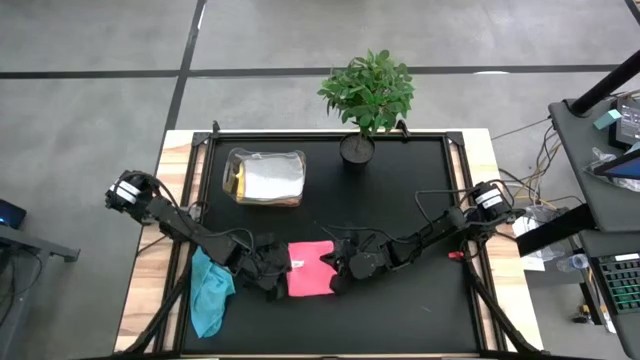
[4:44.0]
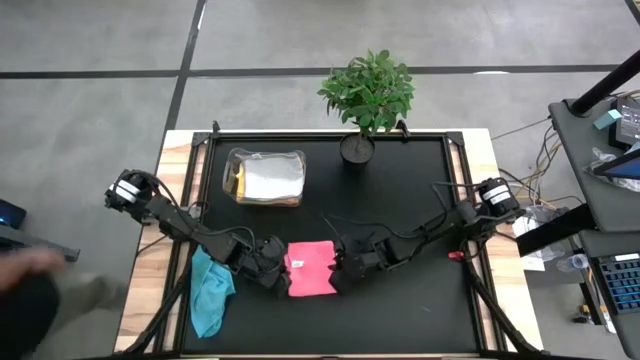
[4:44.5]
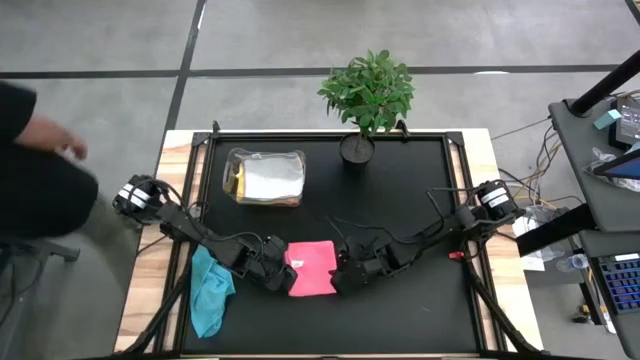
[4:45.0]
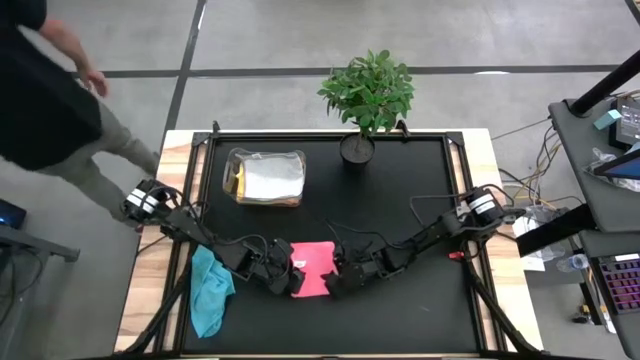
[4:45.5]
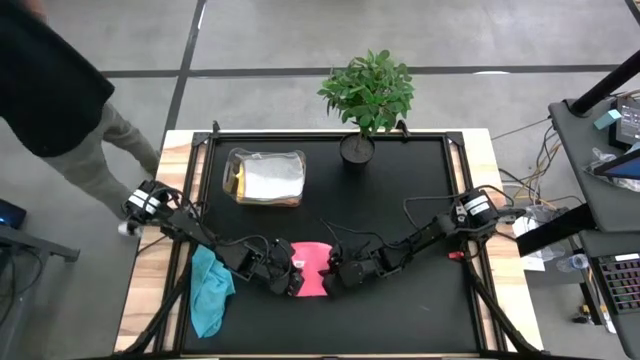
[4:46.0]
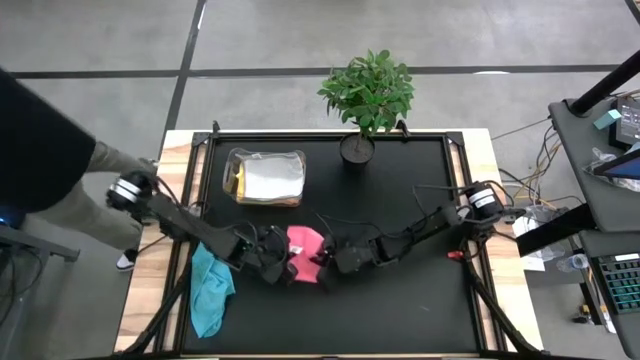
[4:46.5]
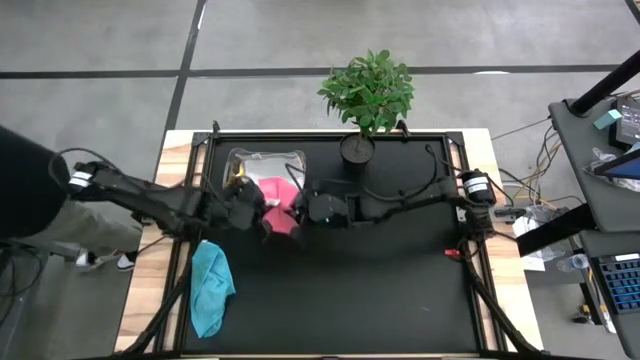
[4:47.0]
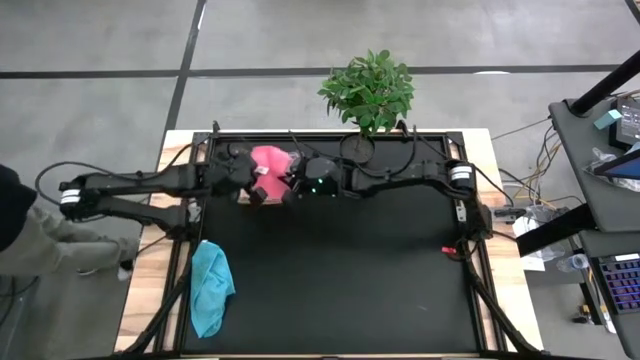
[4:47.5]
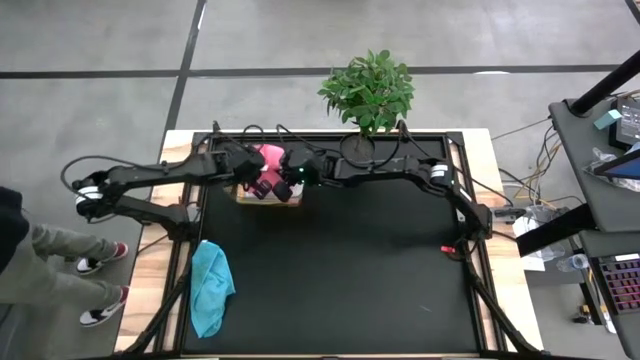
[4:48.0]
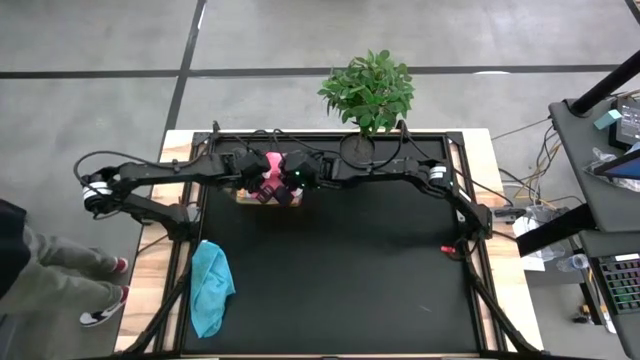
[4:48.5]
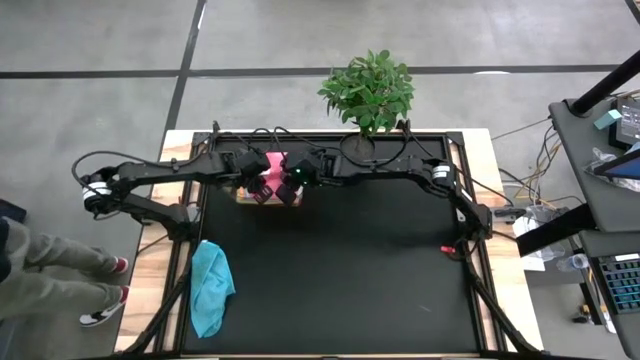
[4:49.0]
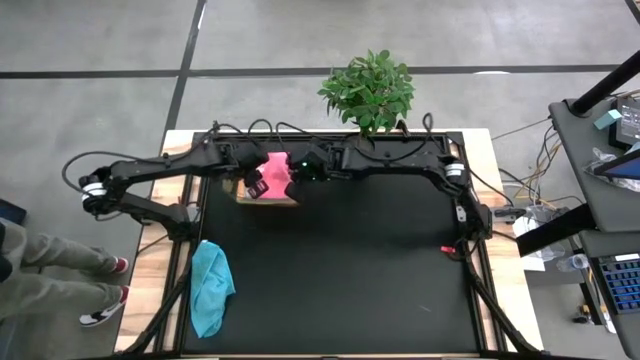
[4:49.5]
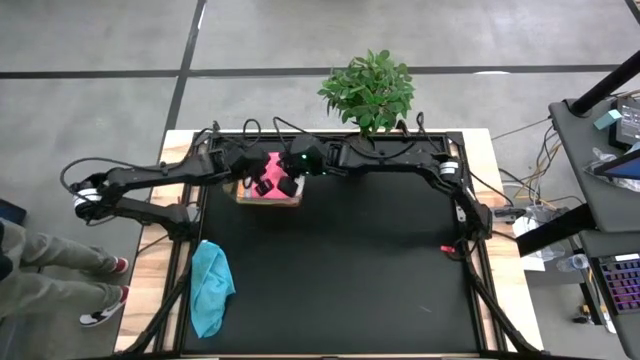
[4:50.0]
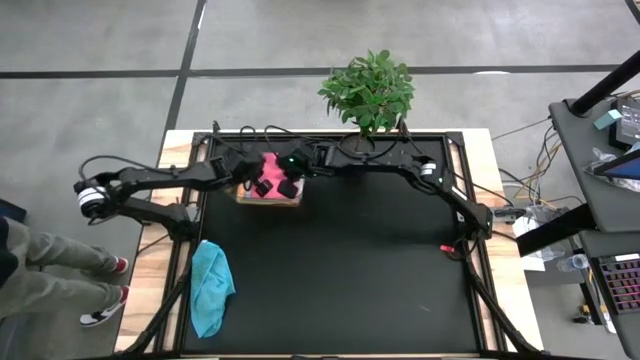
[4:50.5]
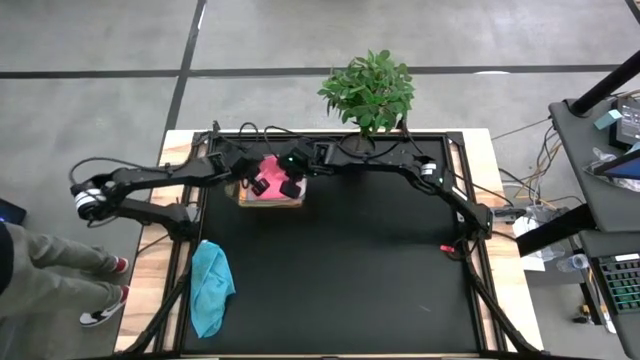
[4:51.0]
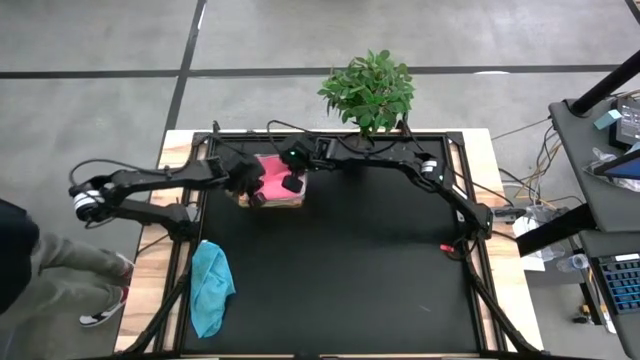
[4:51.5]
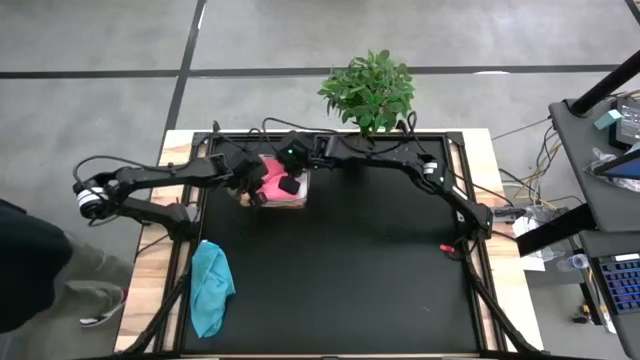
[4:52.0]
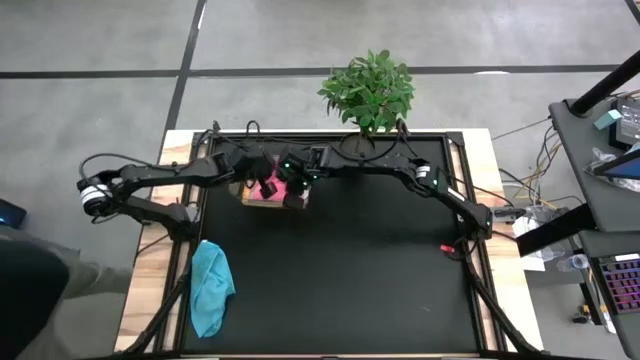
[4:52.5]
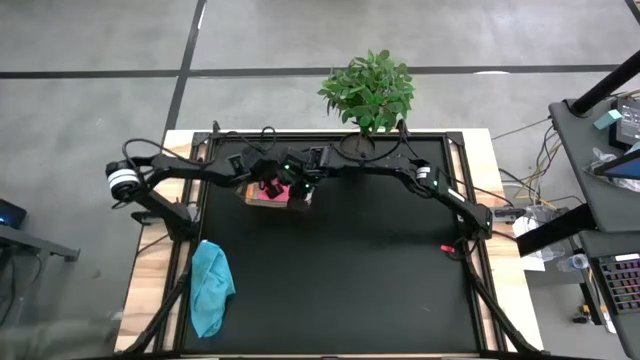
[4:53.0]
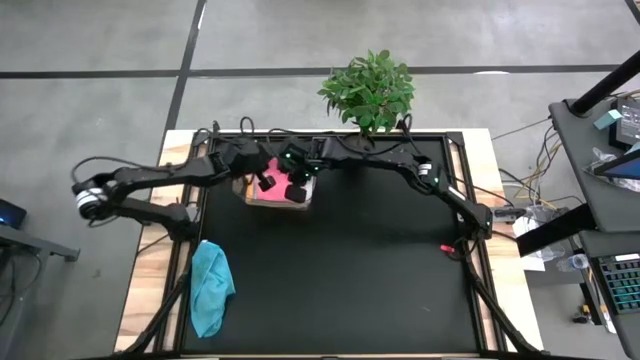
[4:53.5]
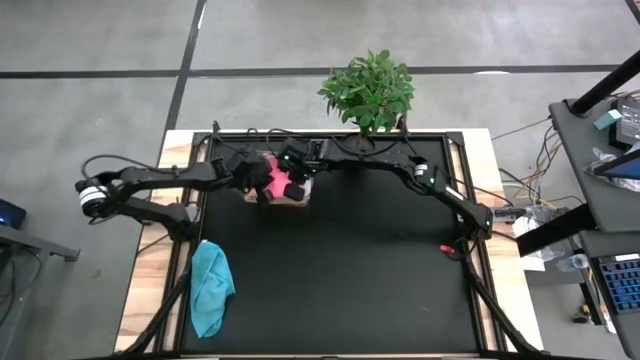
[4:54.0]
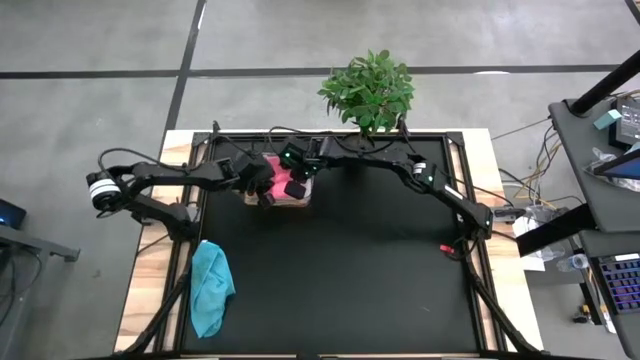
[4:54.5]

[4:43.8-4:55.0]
Task: Fold microfiber towels
Put the pink towel into the transparent bin

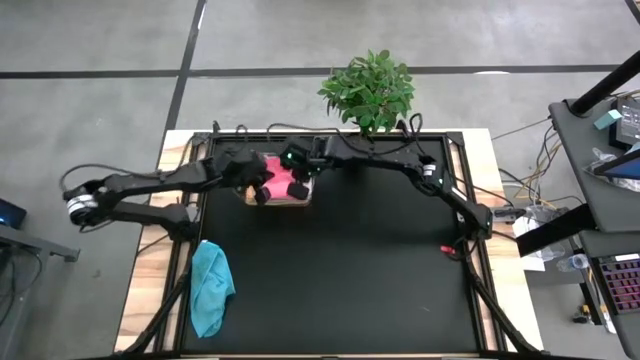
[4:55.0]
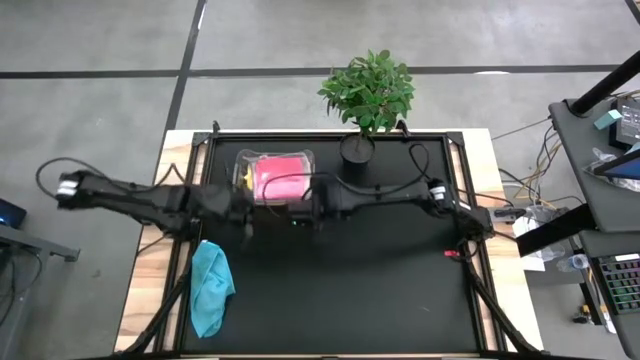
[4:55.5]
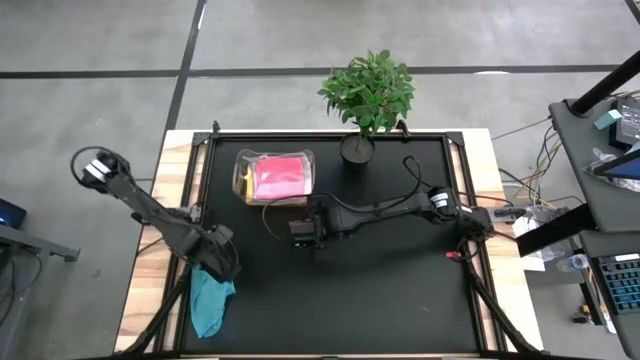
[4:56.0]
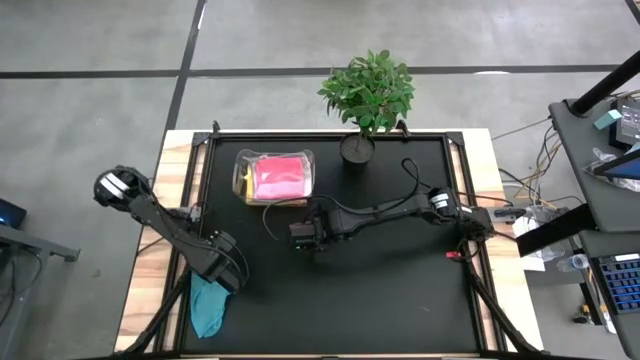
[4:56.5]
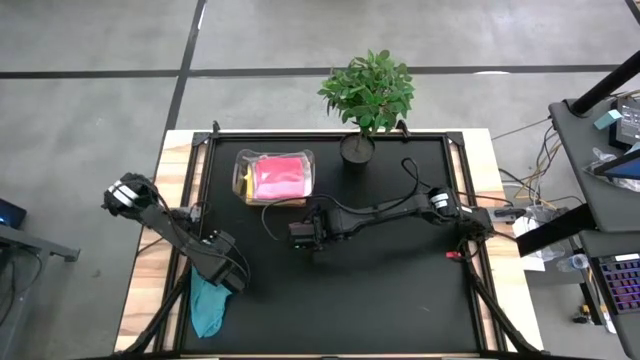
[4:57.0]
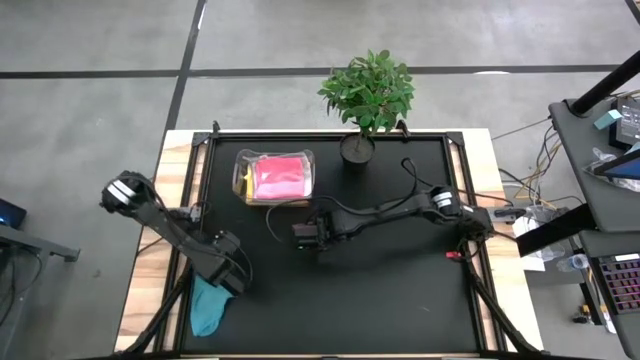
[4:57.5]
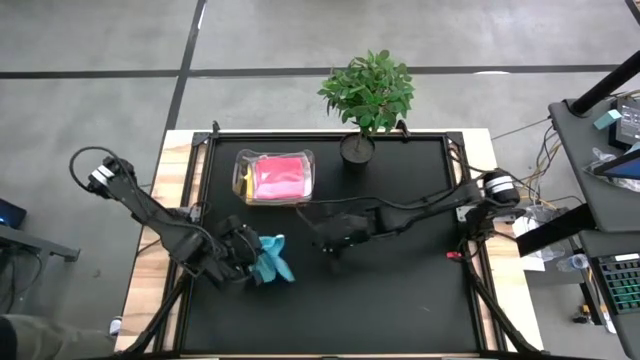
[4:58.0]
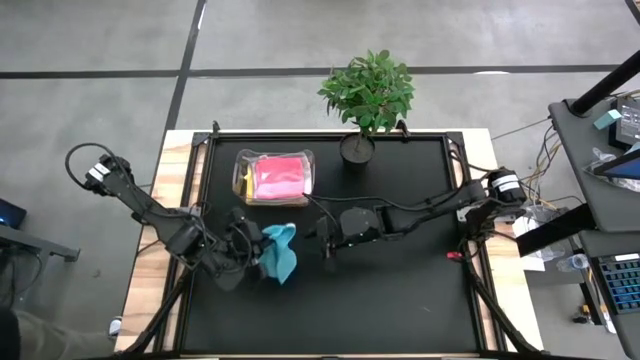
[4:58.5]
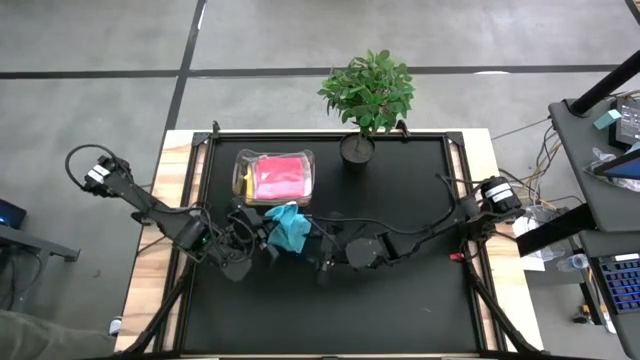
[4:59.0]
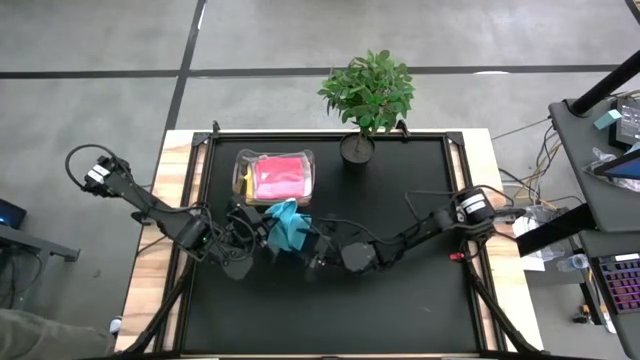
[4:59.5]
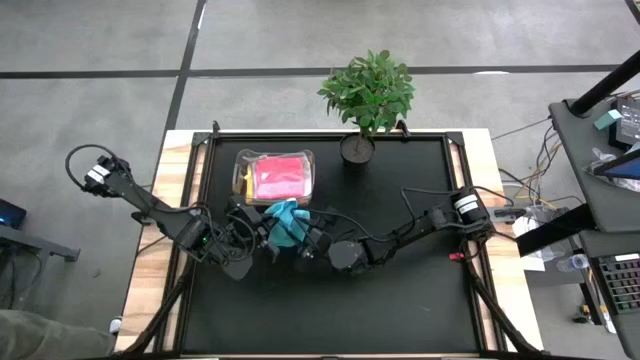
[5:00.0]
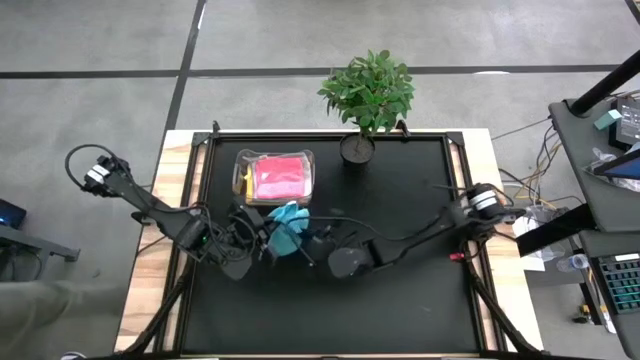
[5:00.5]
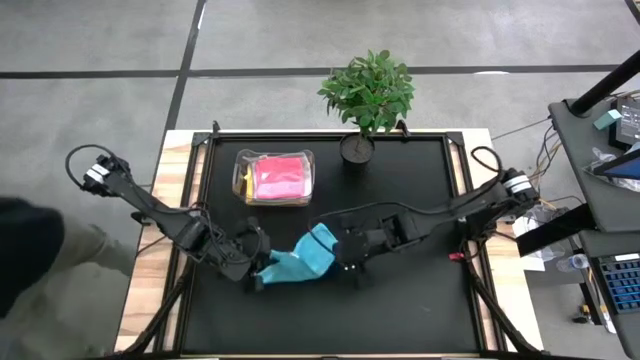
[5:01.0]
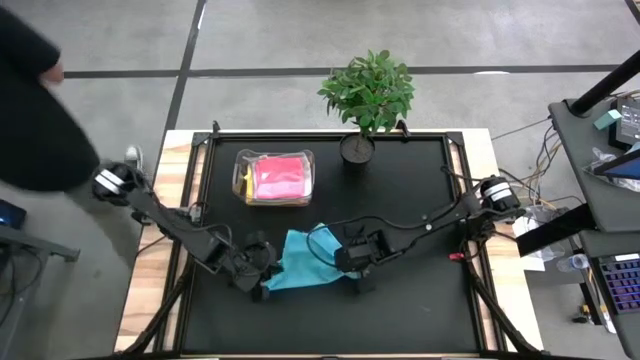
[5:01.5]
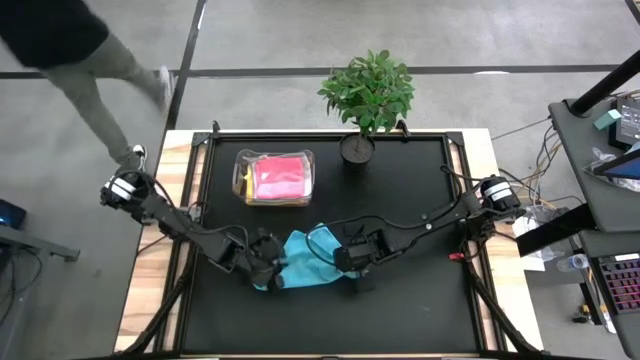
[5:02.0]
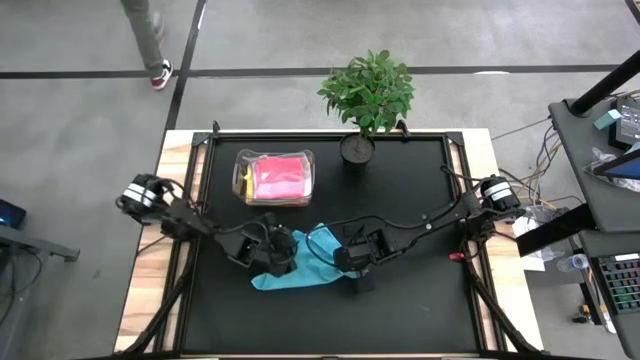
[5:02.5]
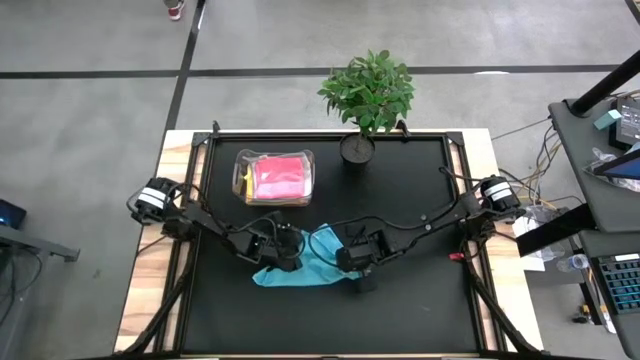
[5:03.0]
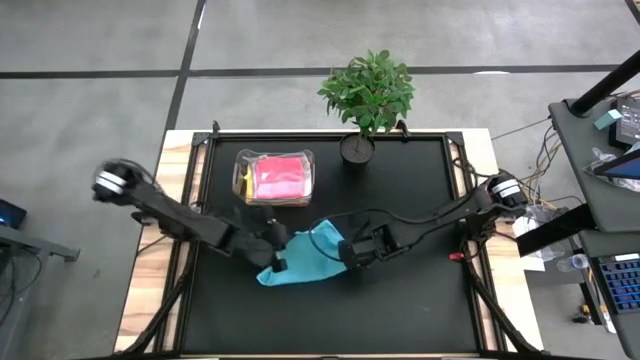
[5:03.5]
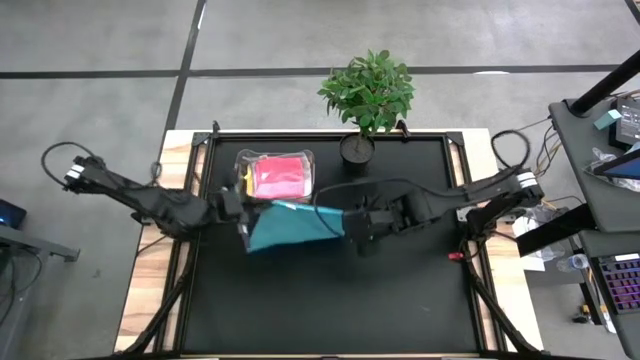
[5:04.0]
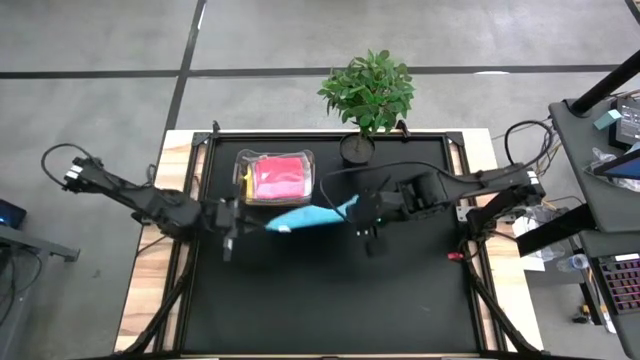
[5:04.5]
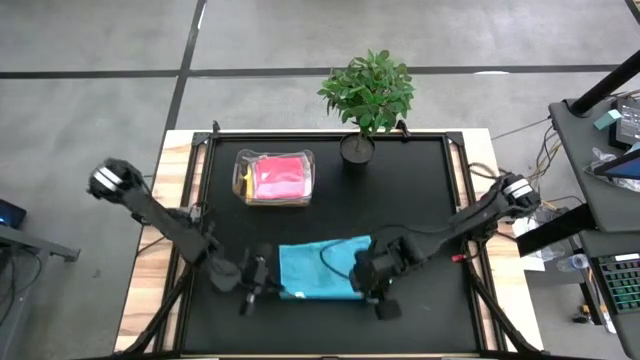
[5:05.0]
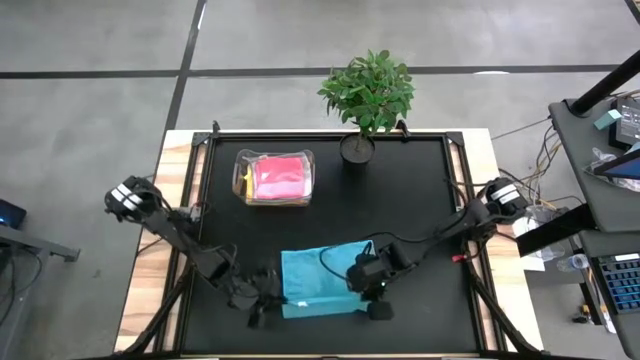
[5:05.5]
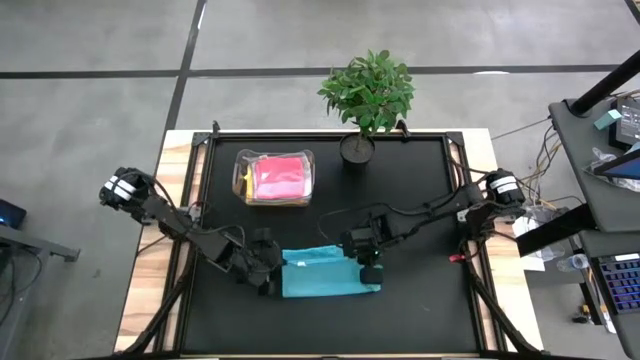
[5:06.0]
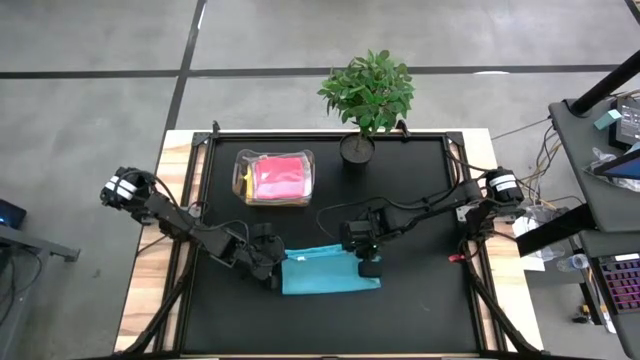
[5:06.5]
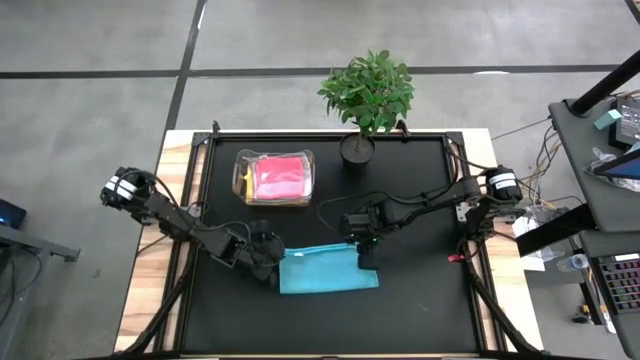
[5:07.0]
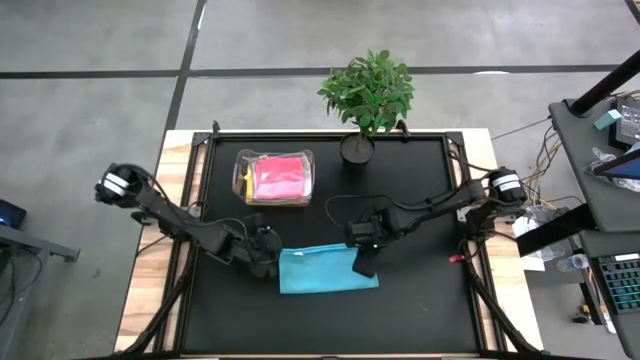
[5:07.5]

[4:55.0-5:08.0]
Fold the blue towel
